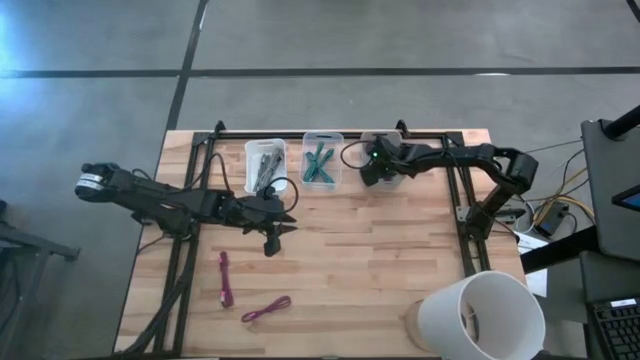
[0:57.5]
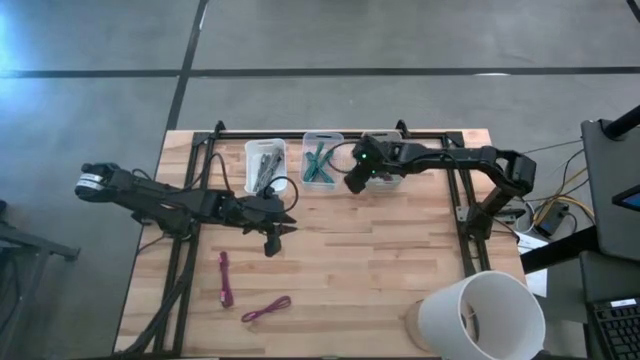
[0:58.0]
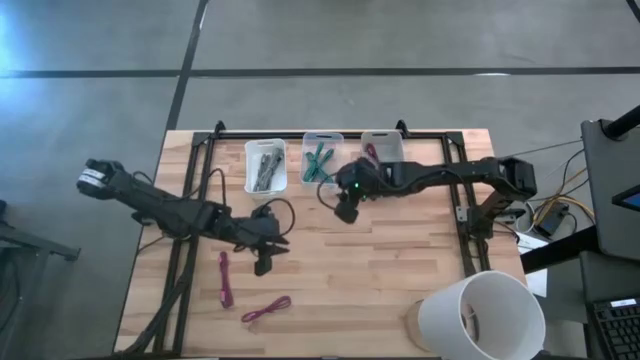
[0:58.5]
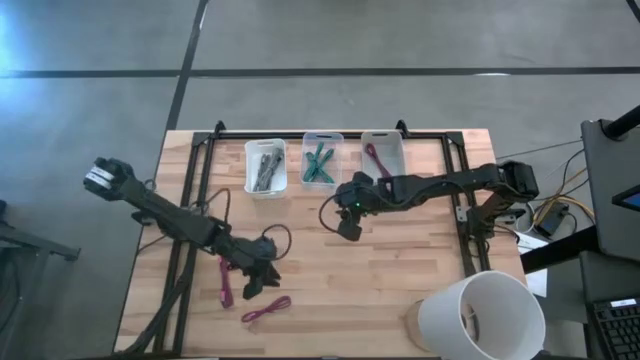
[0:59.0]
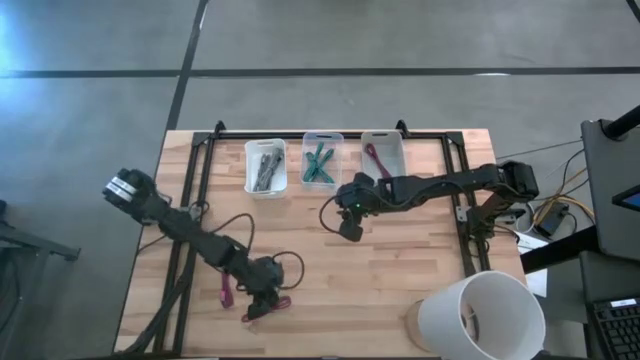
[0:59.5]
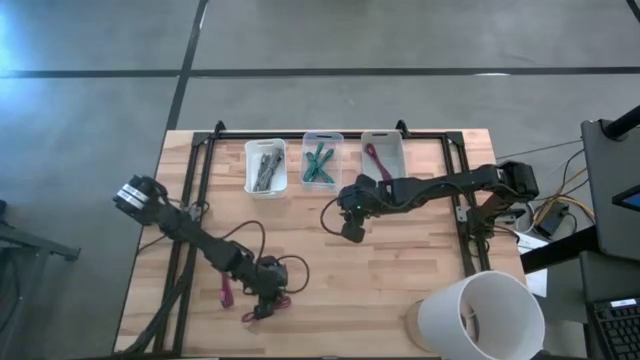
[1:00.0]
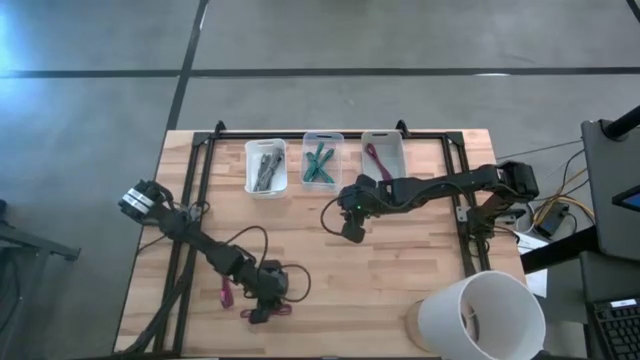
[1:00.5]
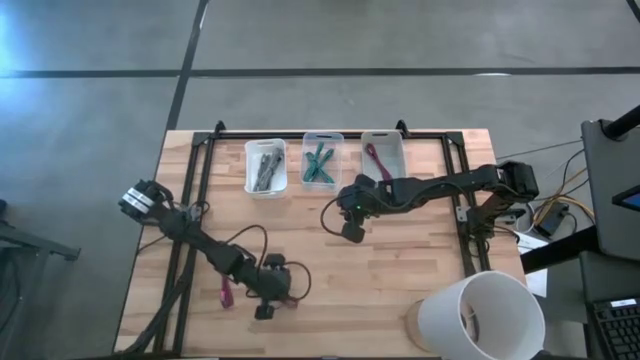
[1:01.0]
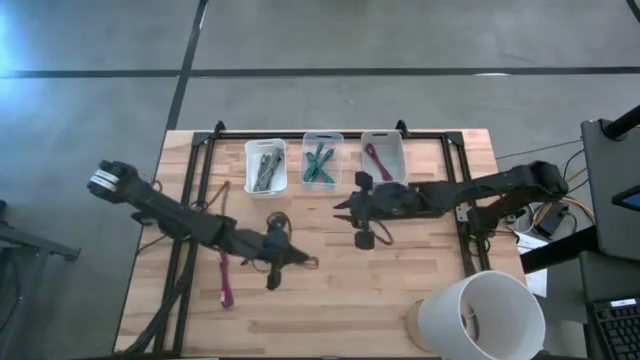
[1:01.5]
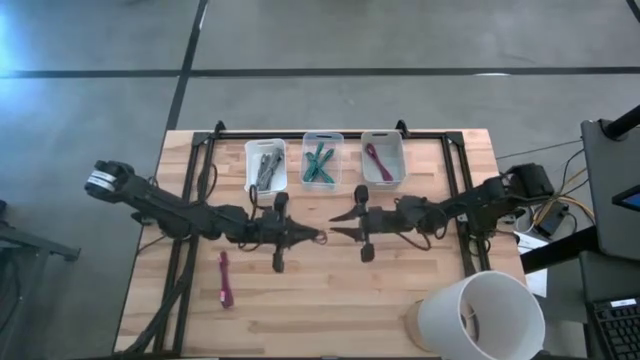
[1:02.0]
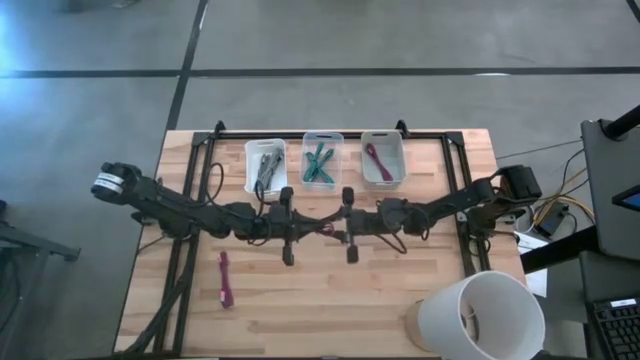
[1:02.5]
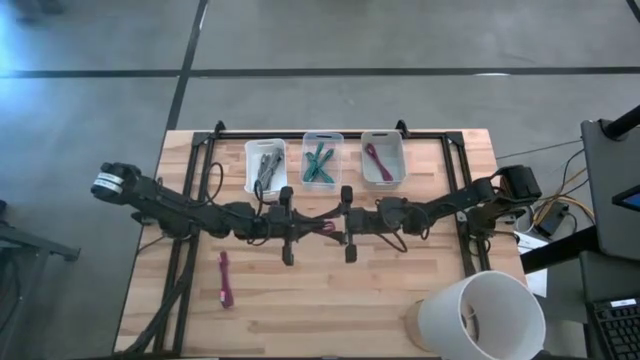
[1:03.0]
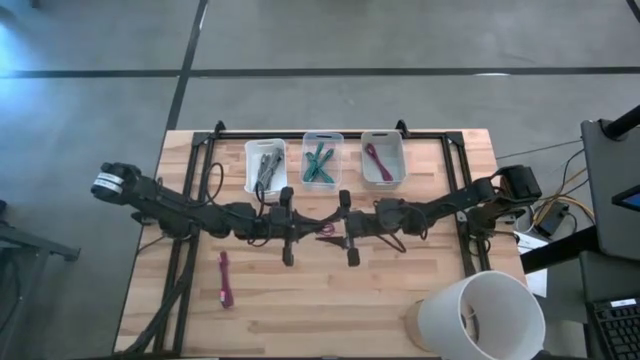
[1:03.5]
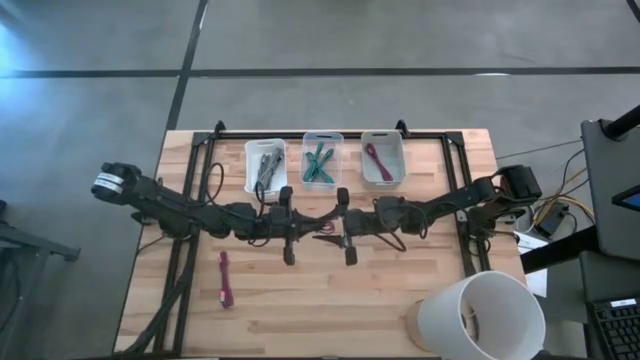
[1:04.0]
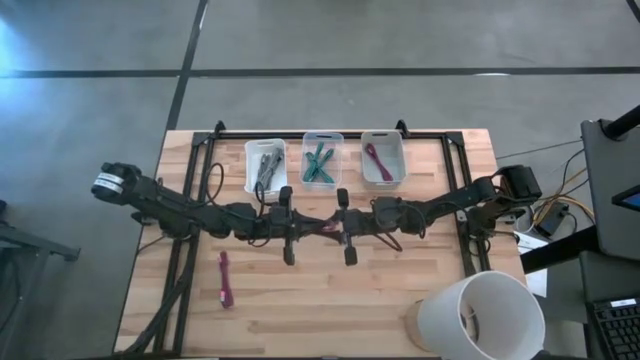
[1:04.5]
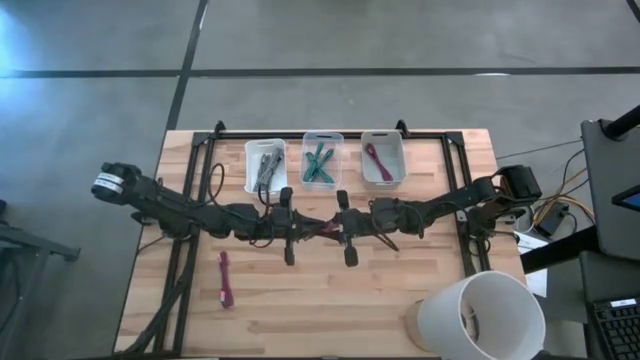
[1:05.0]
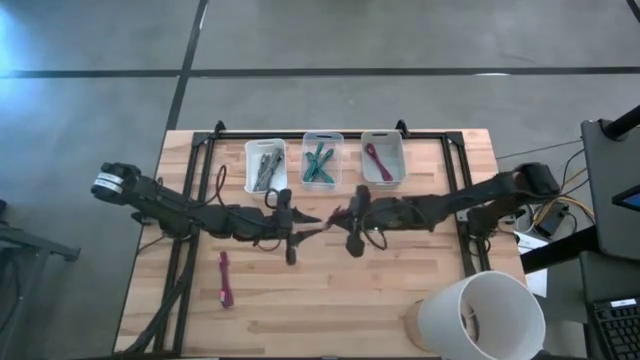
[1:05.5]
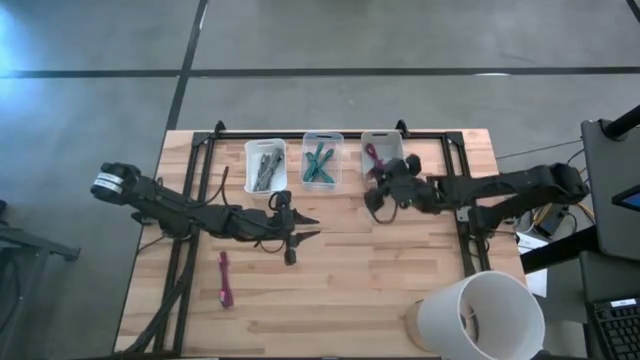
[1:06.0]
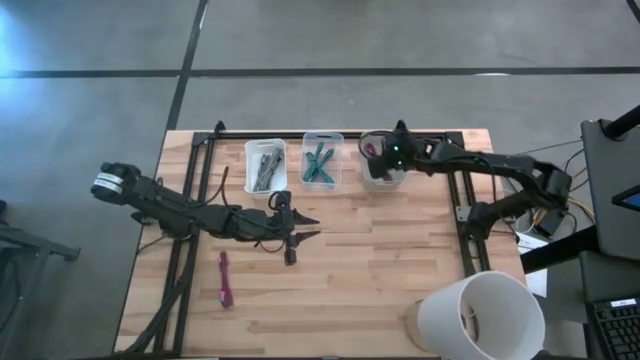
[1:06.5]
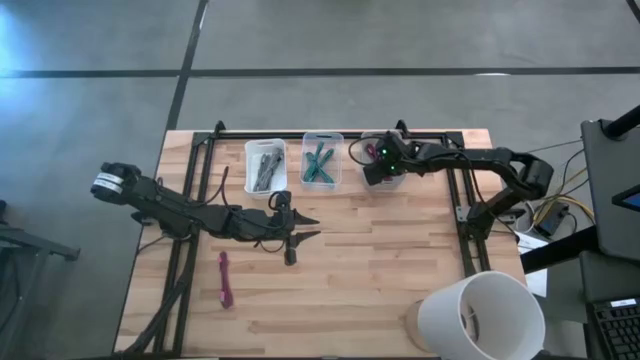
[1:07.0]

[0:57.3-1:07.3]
Task: Pick & Place USB Port
Put the right pink charger cable into the gray bin

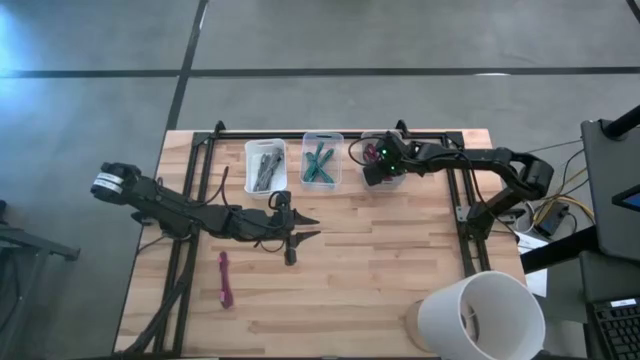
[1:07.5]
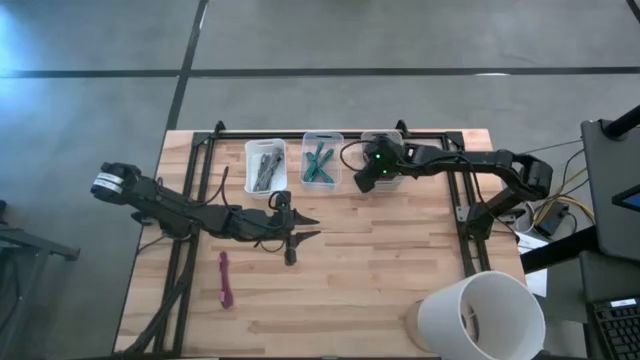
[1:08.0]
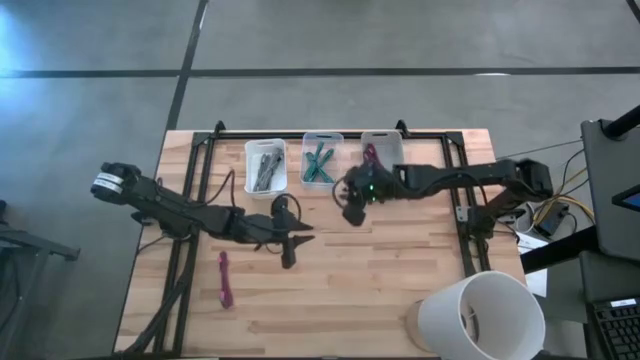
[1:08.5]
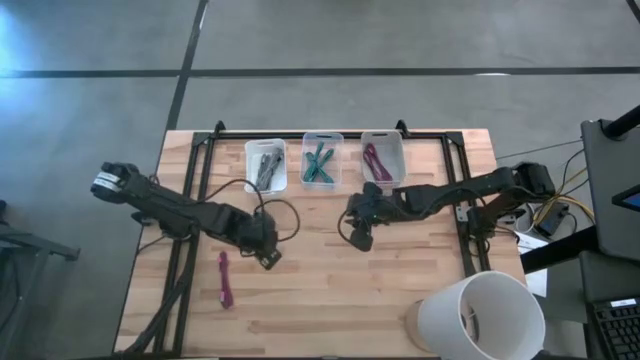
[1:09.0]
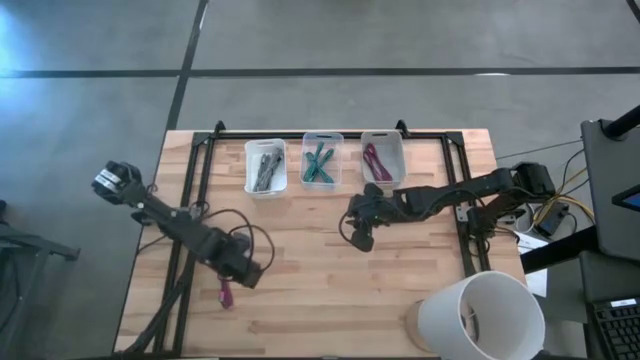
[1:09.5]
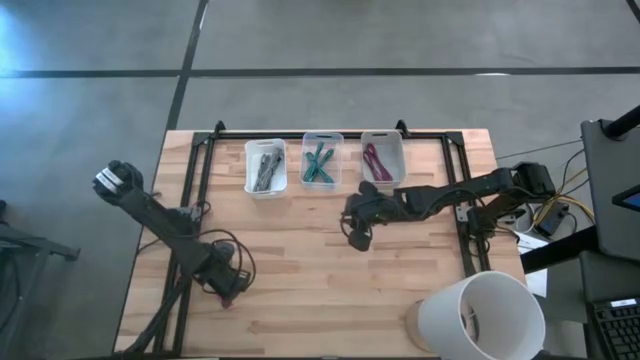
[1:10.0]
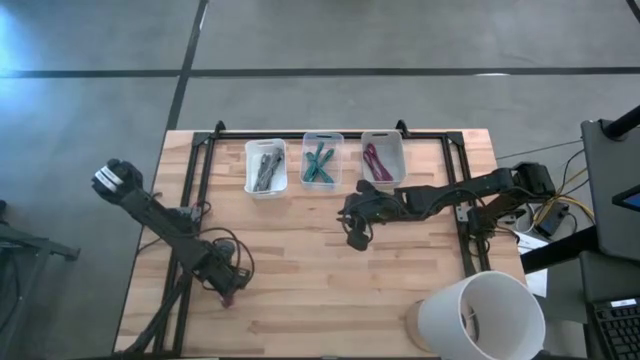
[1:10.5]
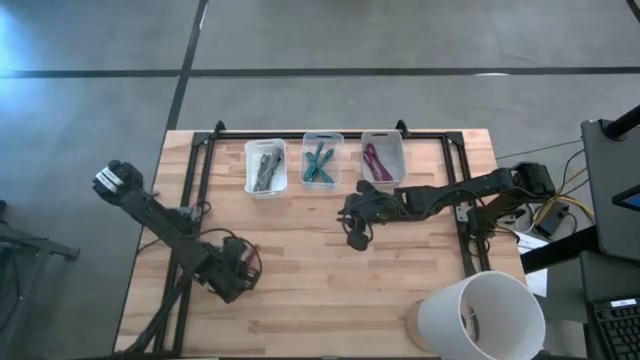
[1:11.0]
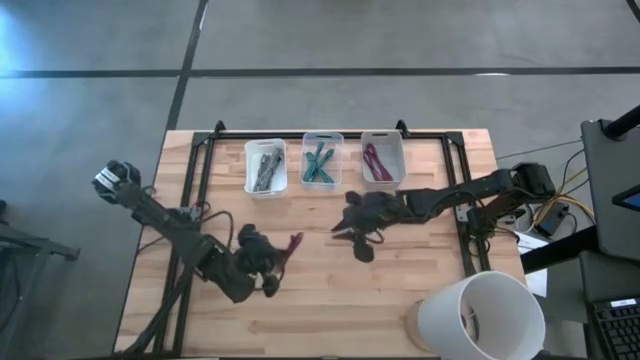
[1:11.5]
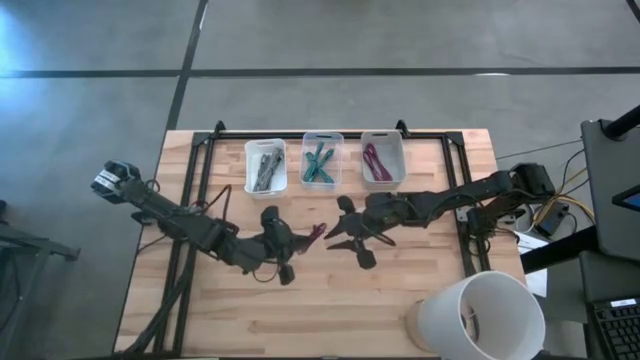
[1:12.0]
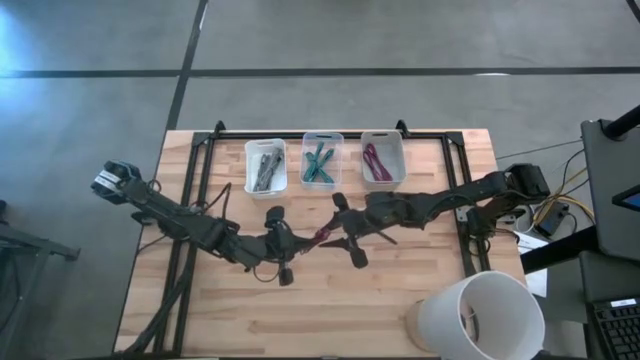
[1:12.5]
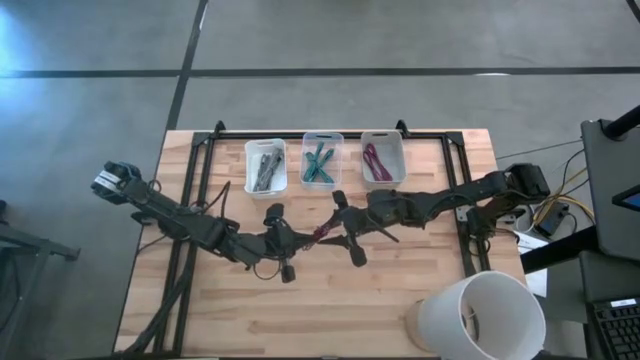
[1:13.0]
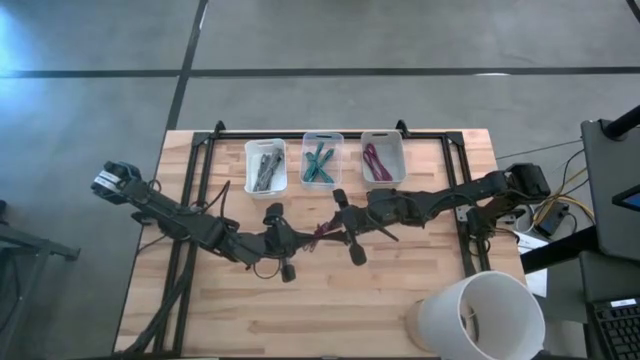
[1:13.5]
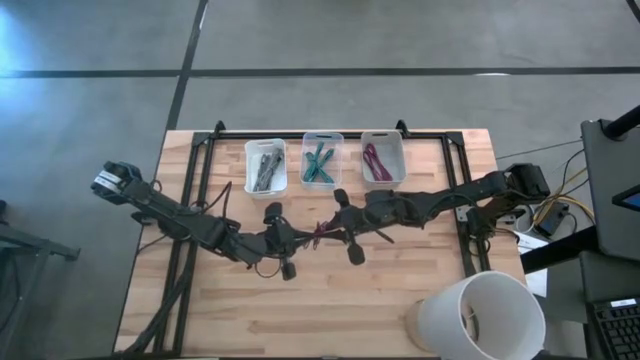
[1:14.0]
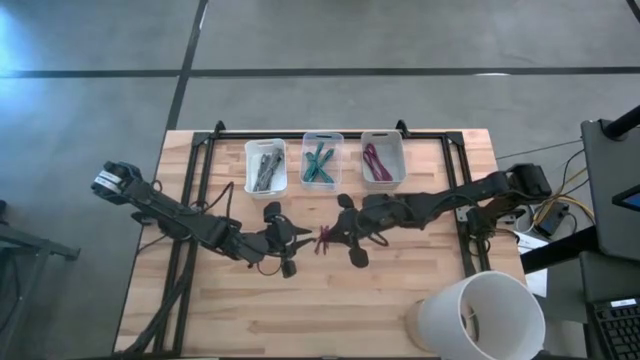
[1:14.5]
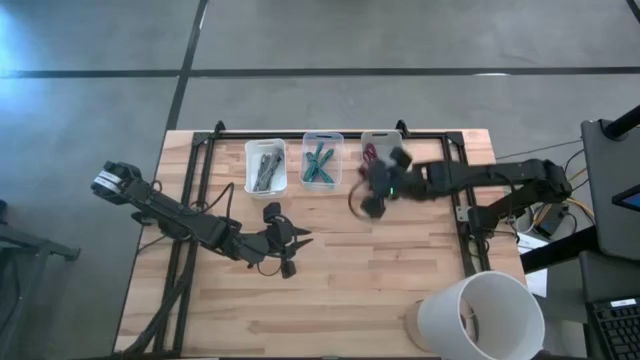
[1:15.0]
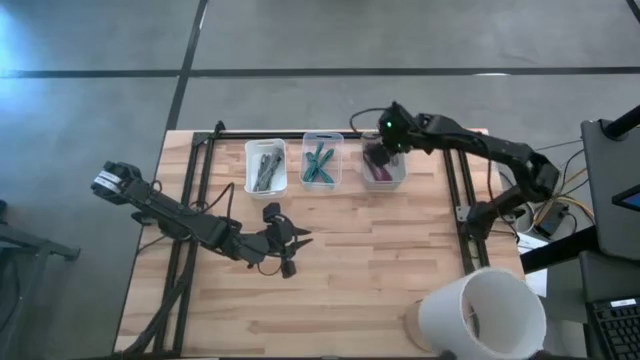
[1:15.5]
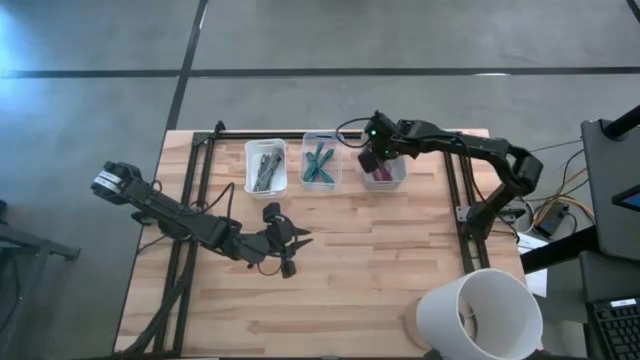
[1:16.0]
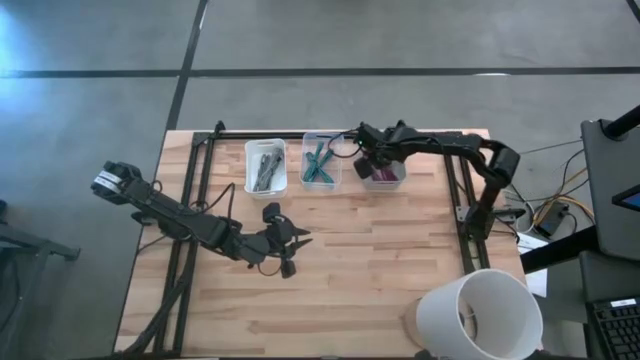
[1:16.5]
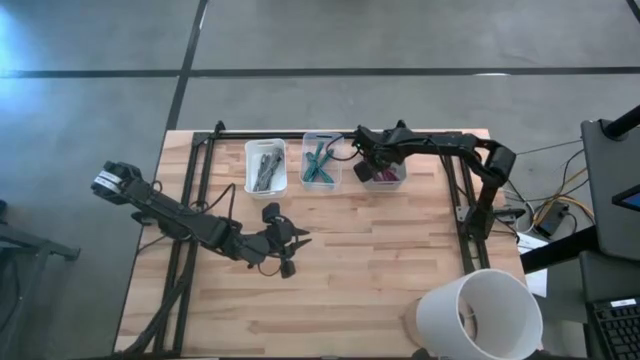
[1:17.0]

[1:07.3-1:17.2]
Put the pink charger cable into the gray bin

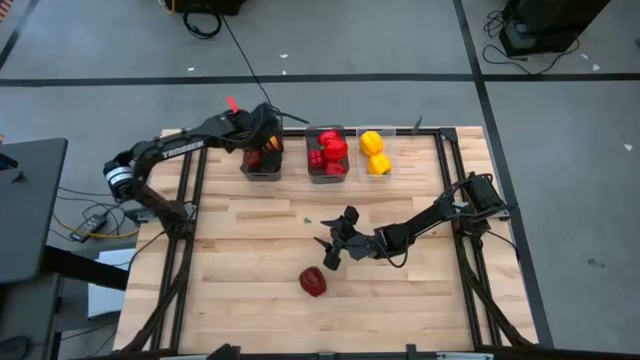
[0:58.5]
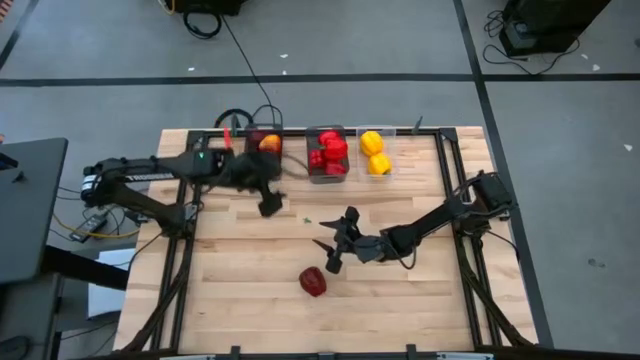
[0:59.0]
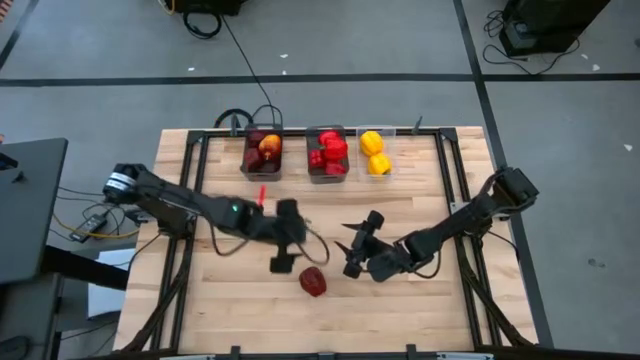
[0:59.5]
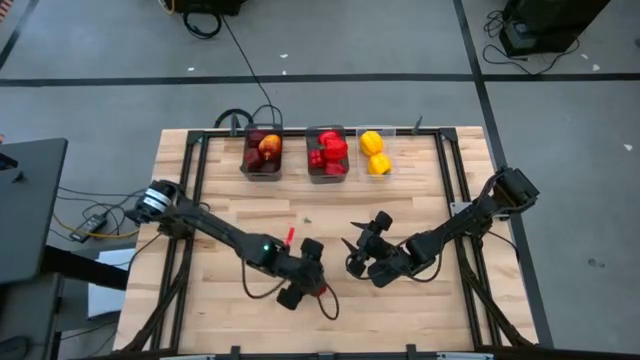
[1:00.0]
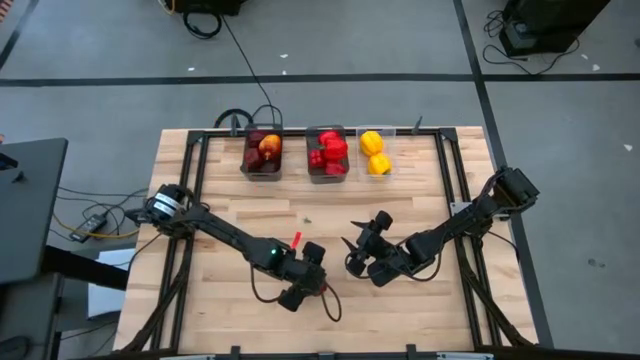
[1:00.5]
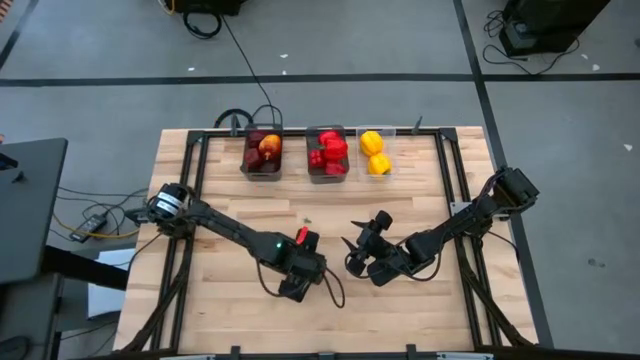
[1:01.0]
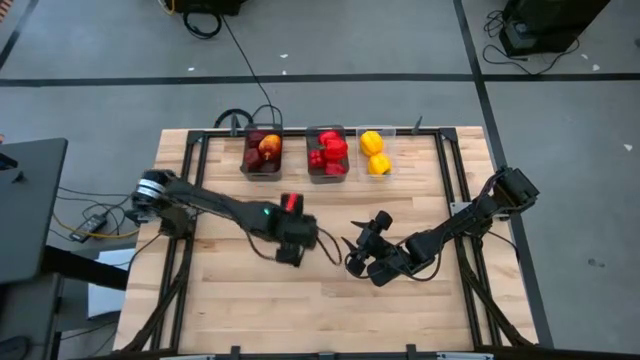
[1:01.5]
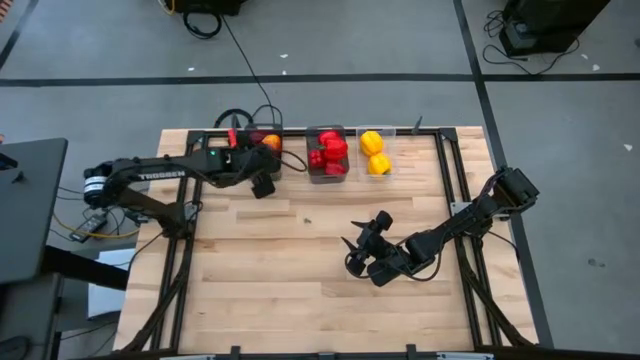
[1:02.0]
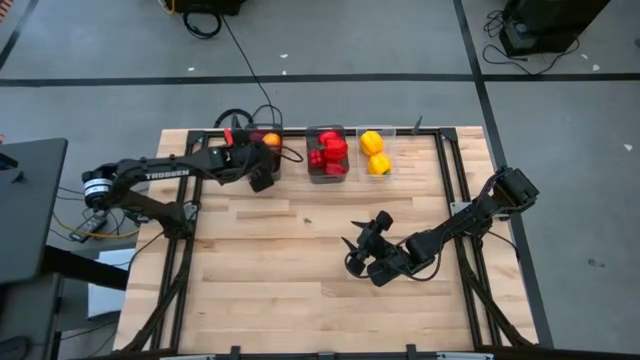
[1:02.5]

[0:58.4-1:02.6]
Task: Sort produce into baskets
Put the dark red apple into the left black bin
